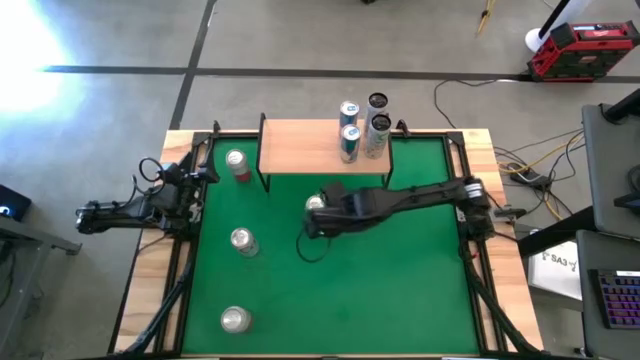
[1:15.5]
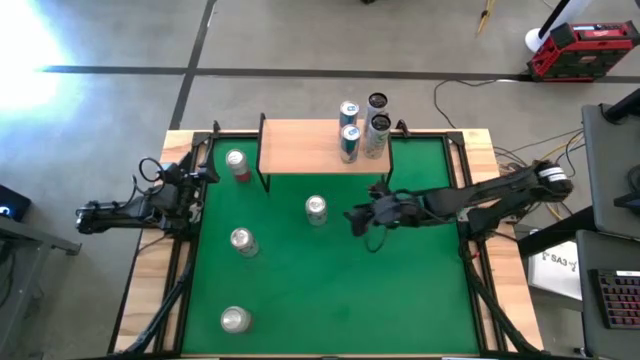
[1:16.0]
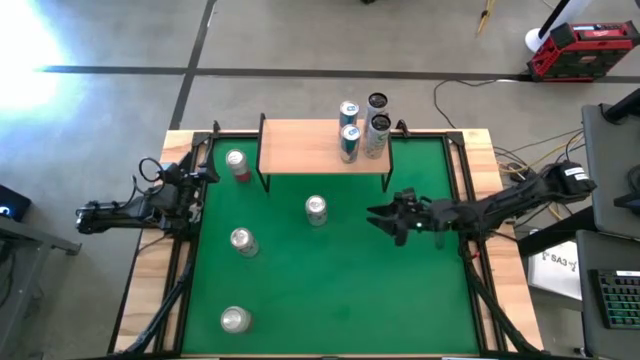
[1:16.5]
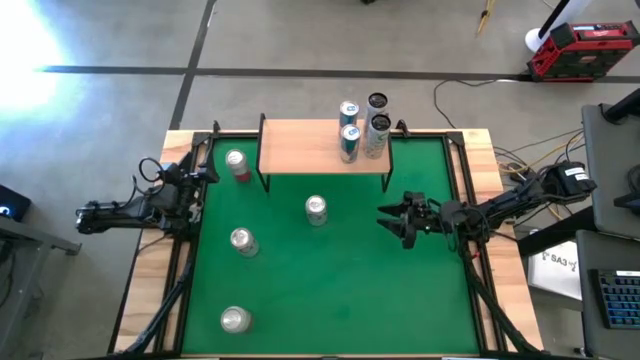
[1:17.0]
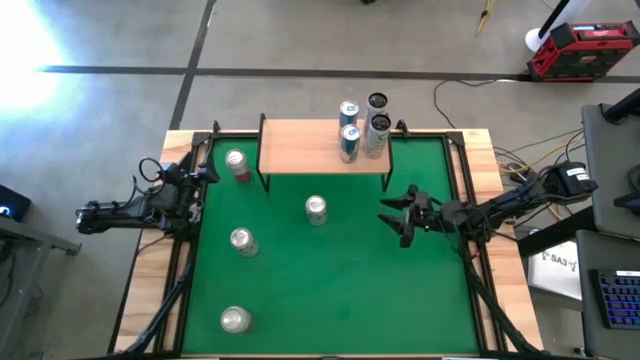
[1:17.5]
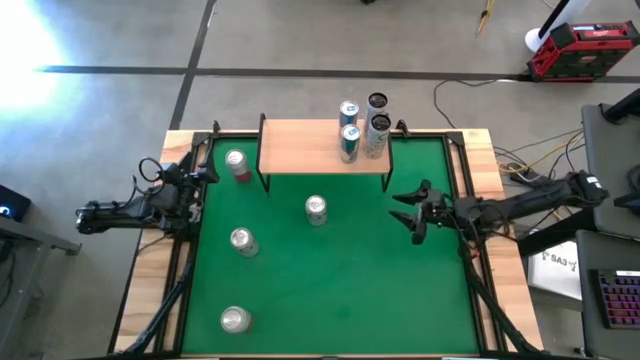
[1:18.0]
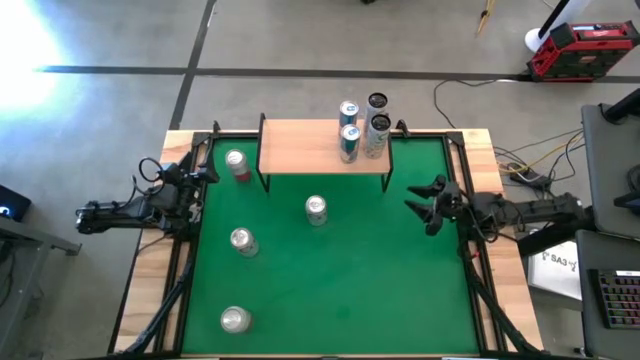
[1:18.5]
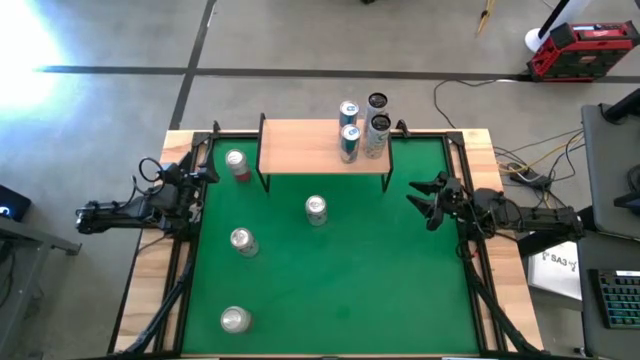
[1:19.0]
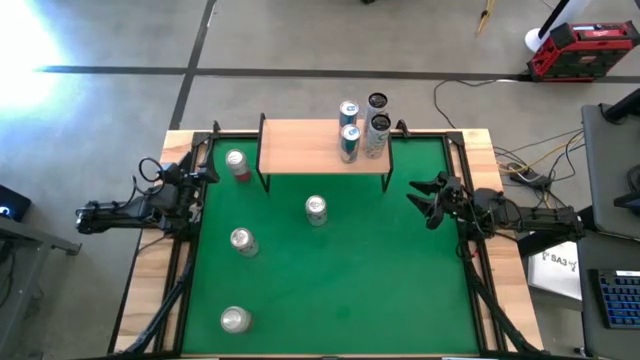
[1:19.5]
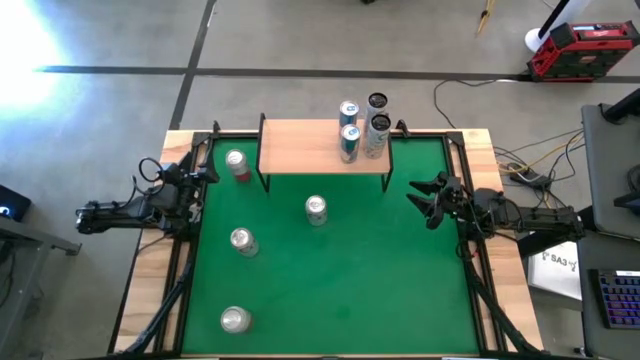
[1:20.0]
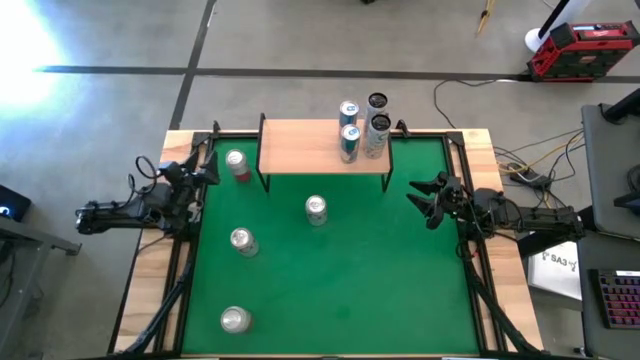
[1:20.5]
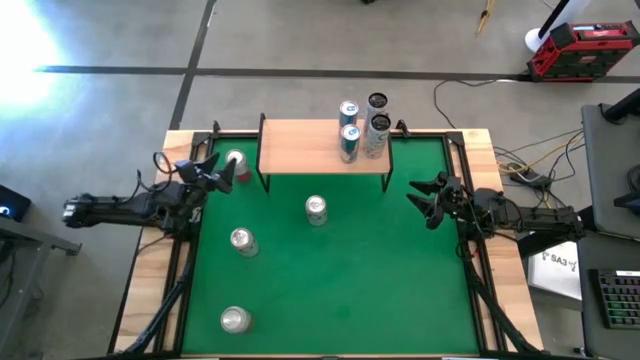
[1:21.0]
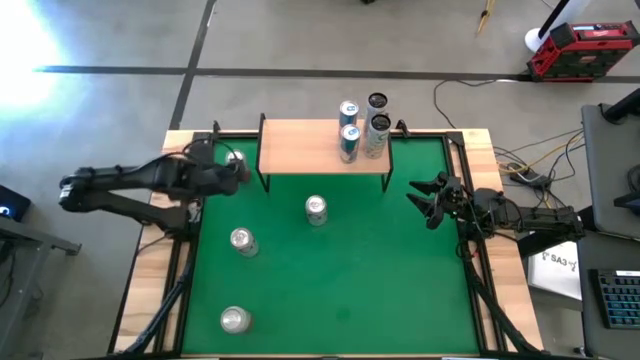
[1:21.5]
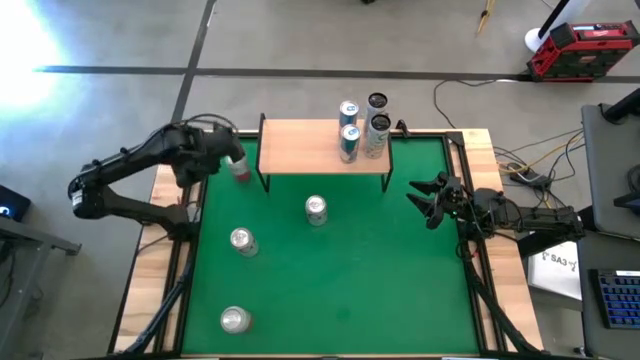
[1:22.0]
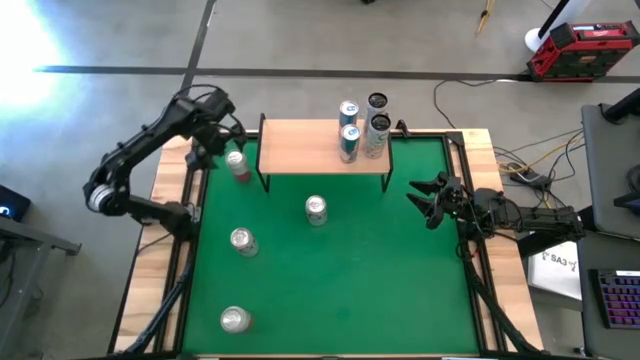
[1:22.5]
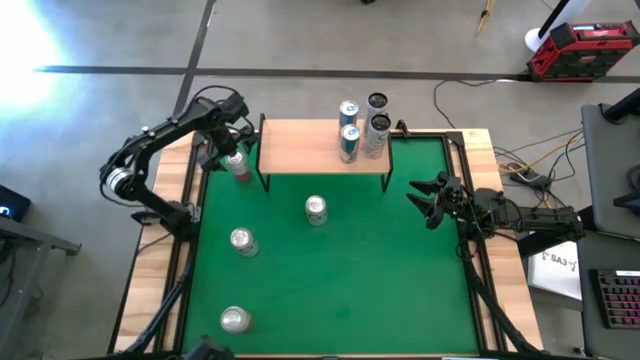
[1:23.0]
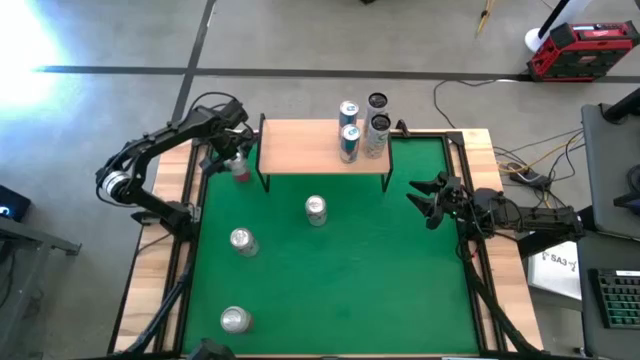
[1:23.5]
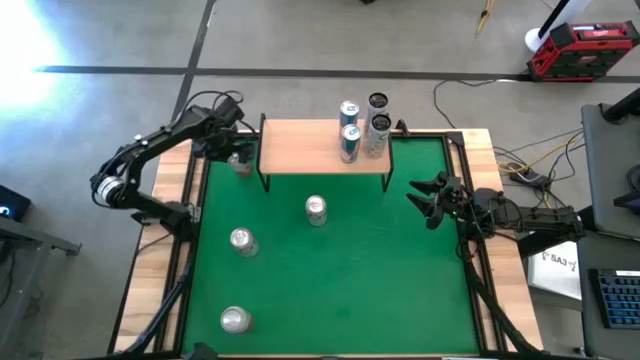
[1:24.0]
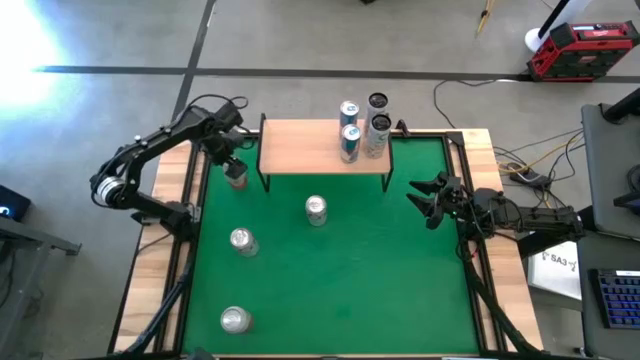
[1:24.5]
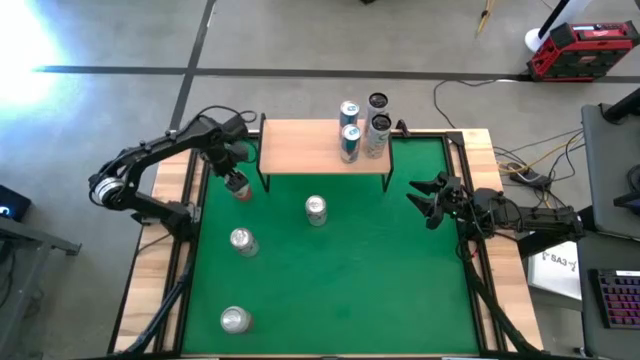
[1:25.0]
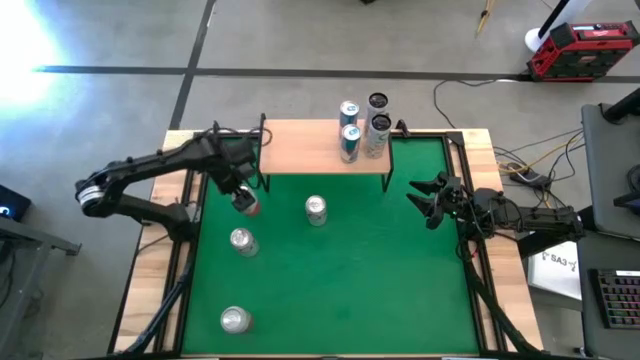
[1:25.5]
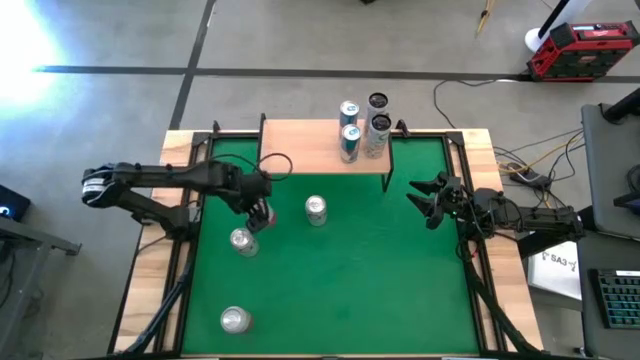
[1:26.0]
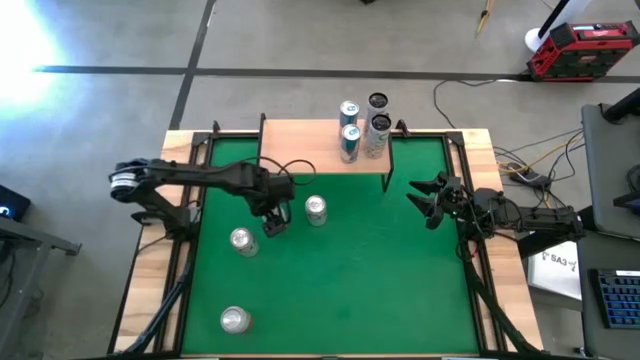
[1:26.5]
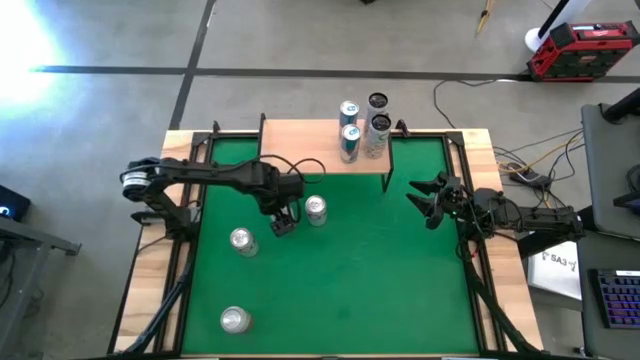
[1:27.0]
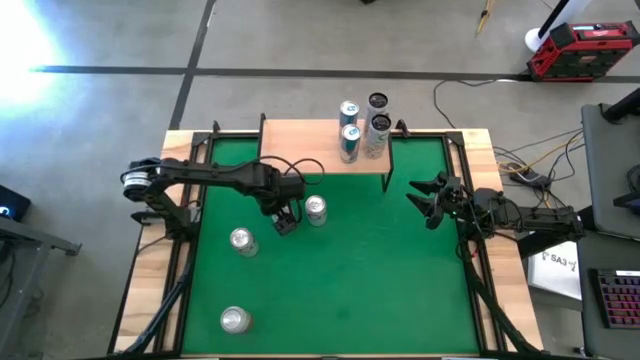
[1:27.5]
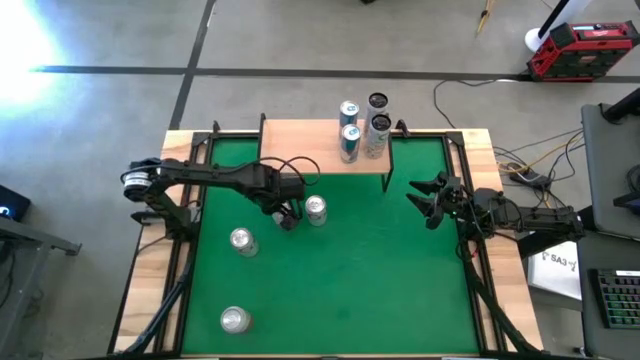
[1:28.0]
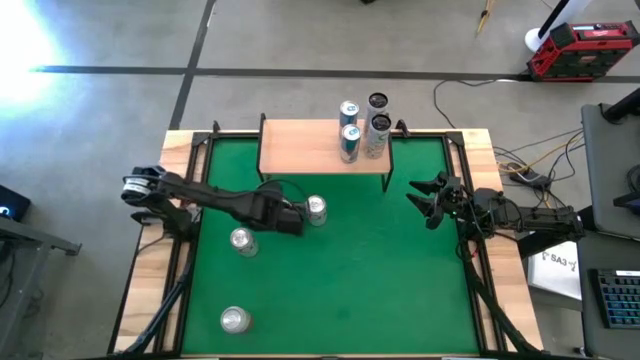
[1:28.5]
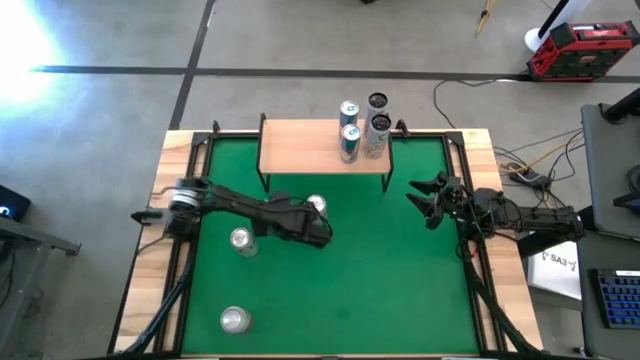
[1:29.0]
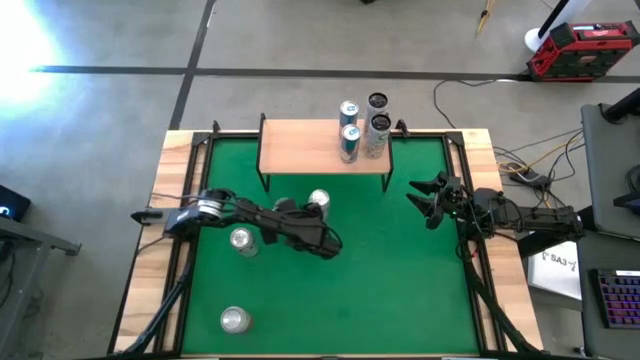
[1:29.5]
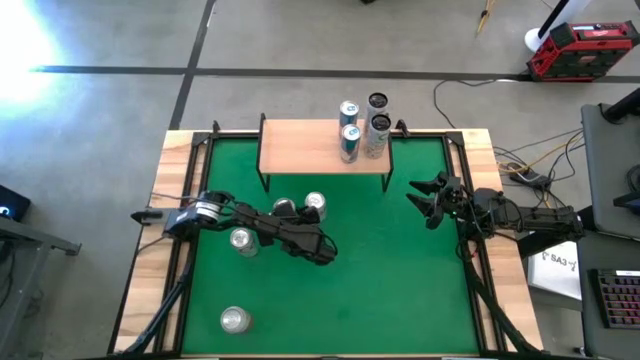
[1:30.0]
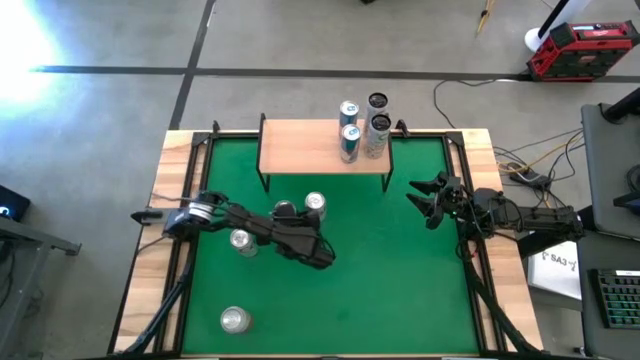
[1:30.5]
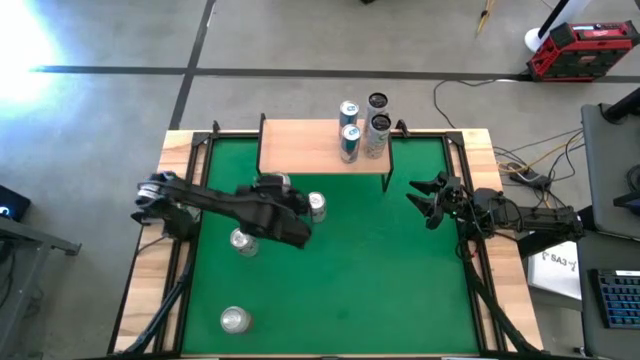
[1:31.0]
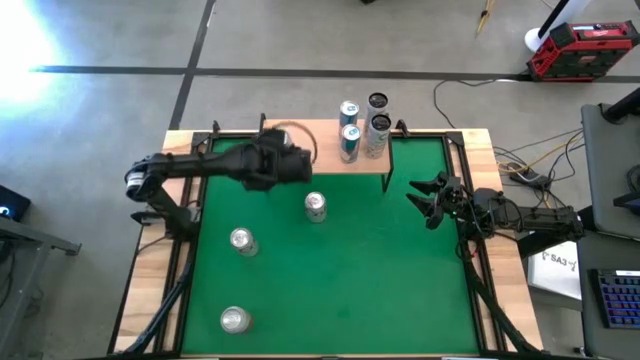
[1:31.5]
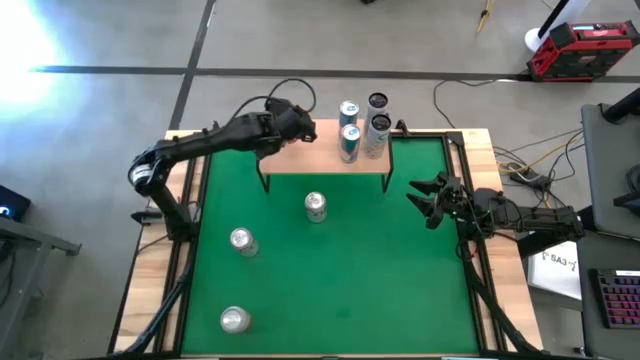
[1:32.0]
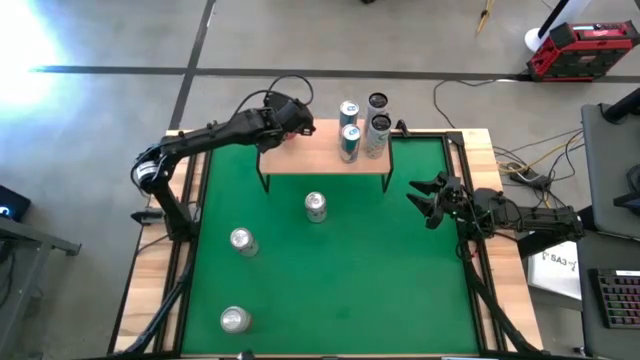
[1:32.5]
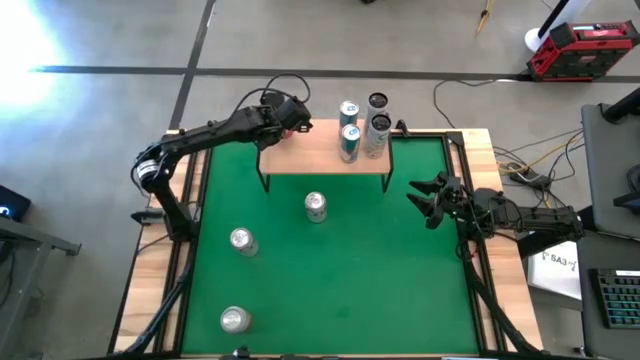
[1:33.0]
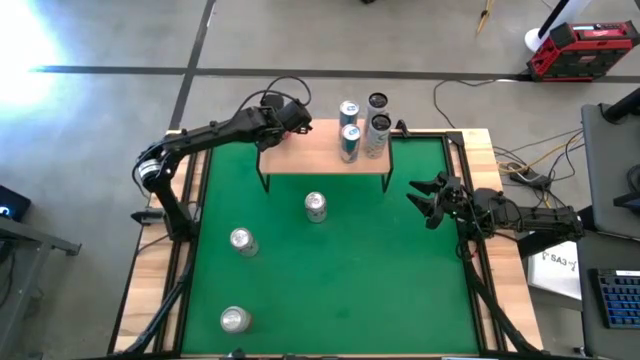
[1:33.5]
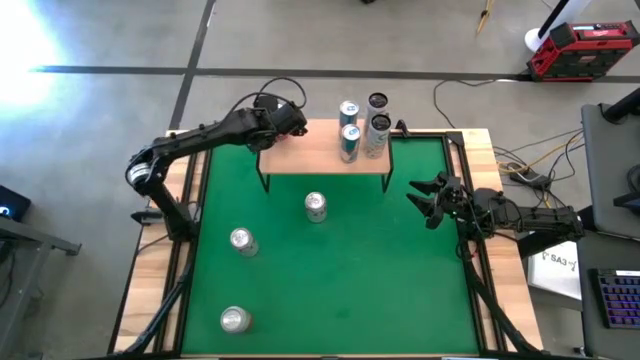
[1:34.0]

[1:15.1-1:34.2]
Task: Place canned beverage on shelf
Put the top pink-white soda can on the shelf

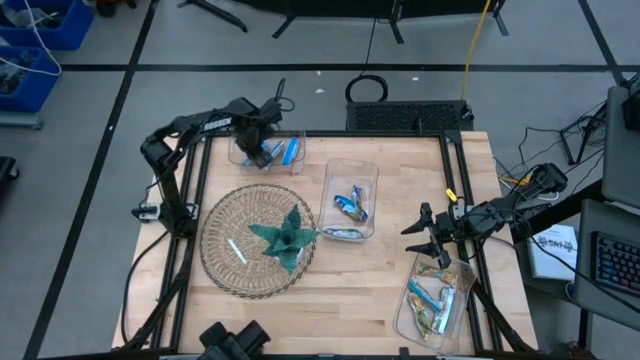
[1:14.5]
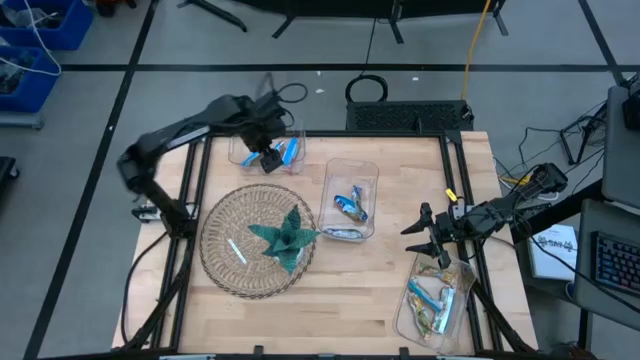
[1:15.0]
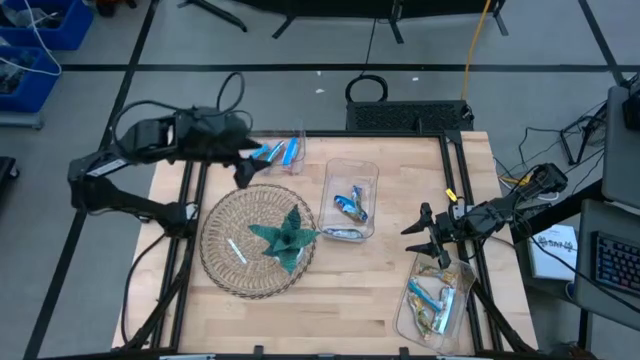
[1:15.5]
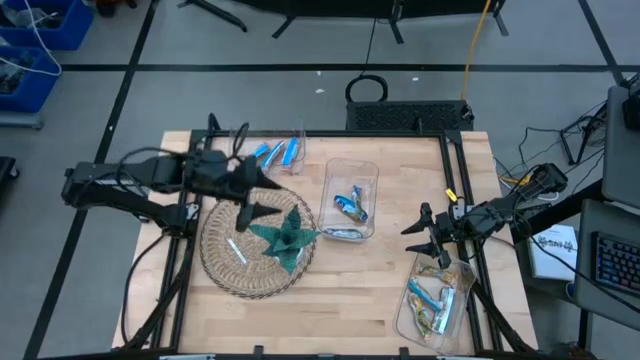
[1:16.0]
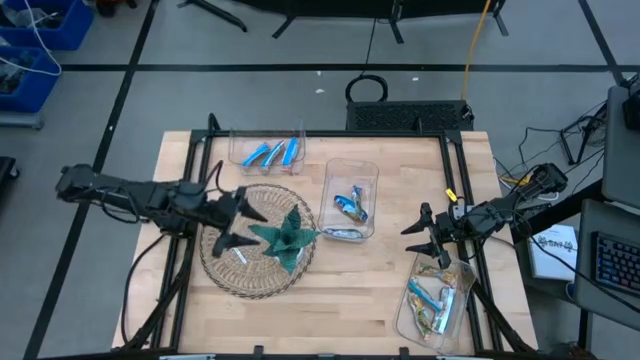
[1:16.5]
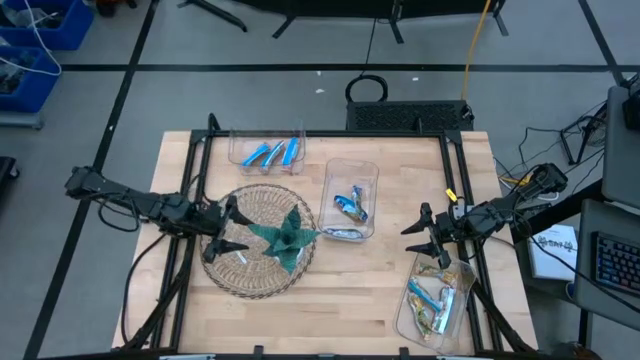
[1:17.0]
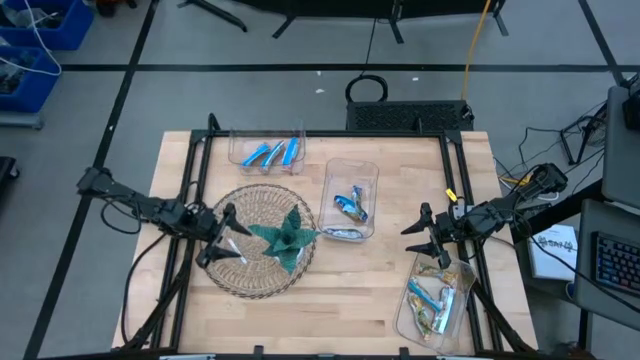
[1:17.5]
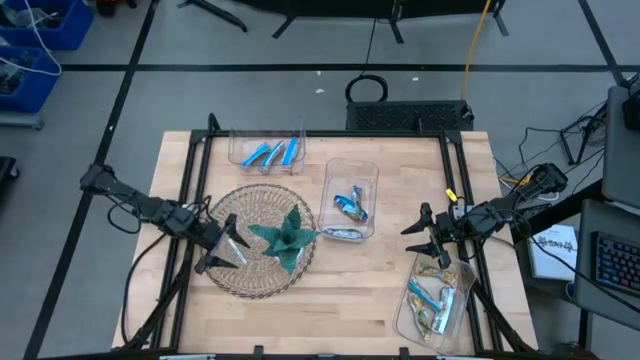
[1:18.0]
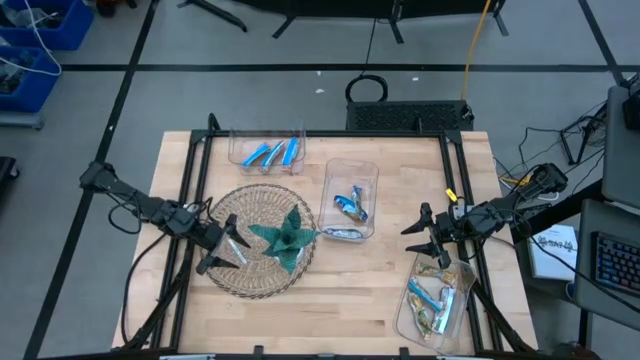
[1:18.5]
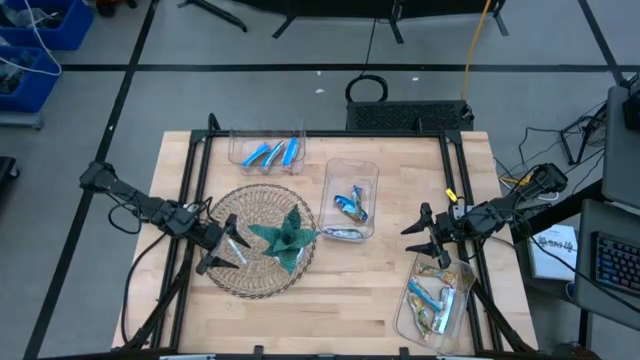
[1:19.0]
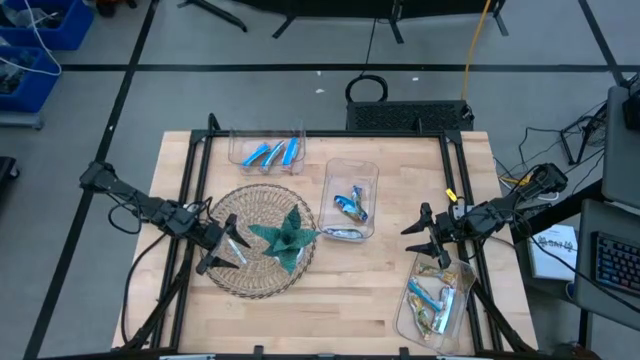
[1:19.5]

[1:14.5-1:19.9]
Task: Pick and place Granola Bars by type
Return to Home Position
